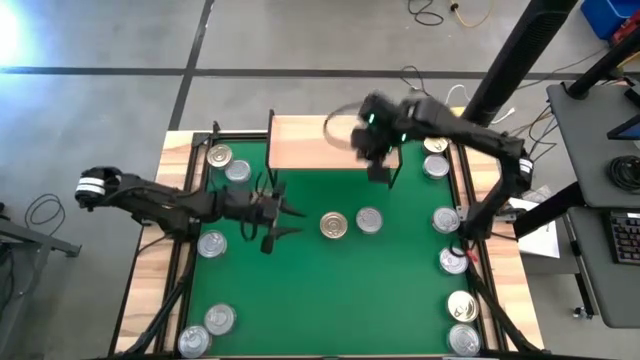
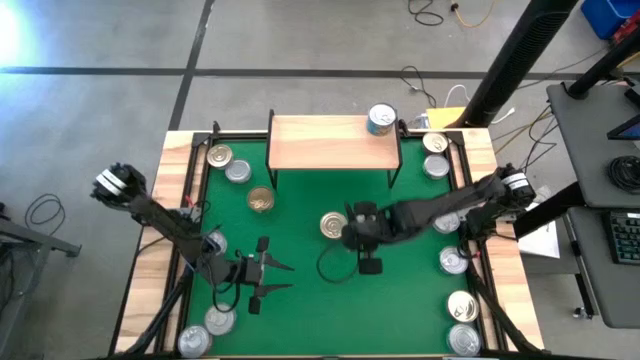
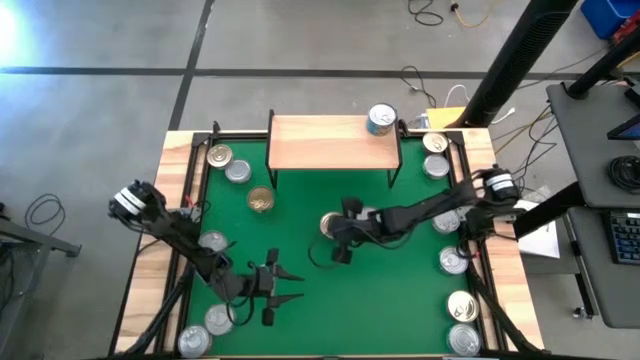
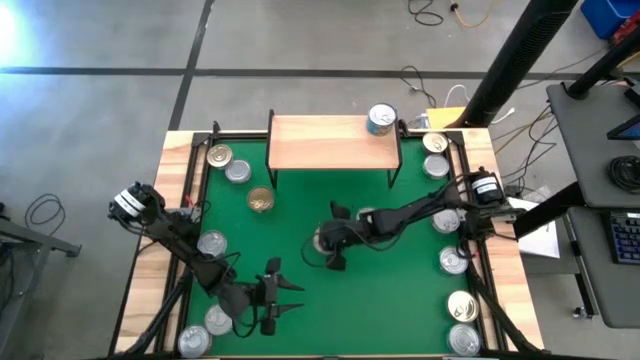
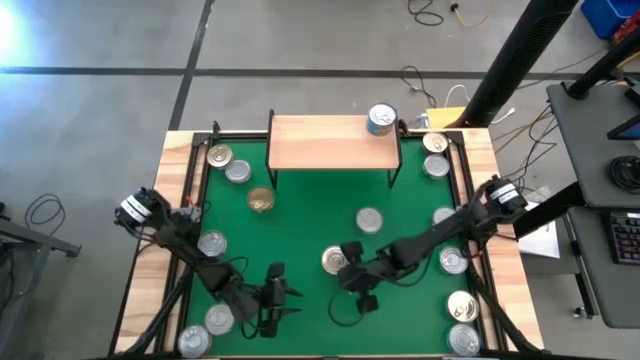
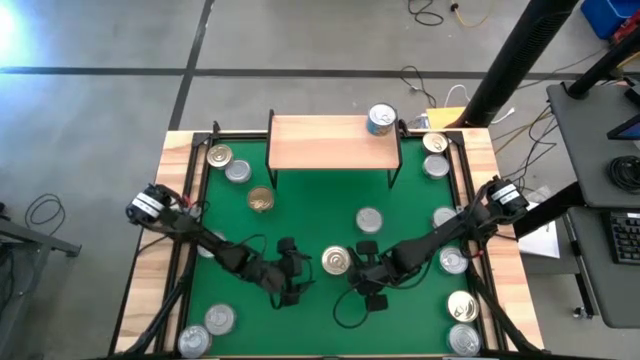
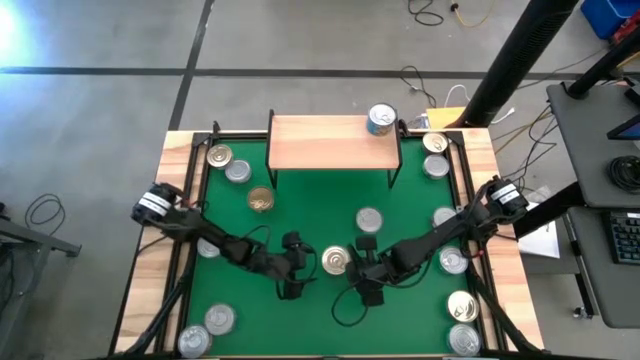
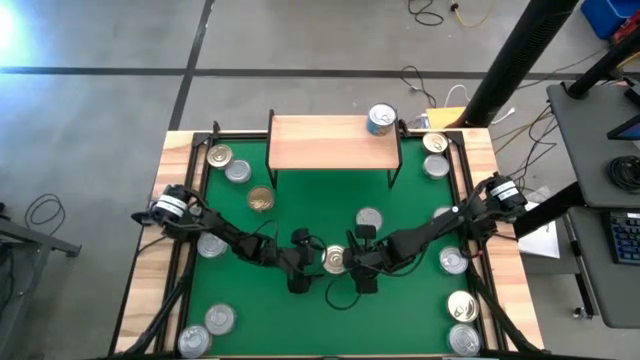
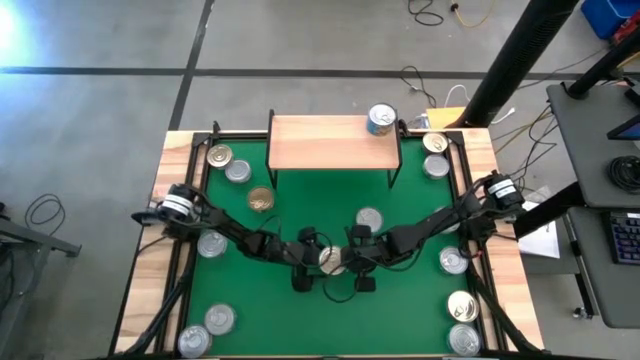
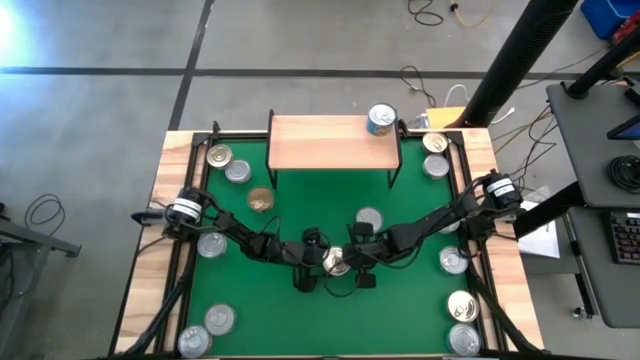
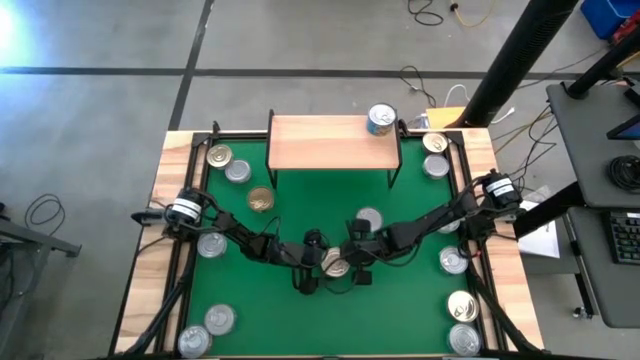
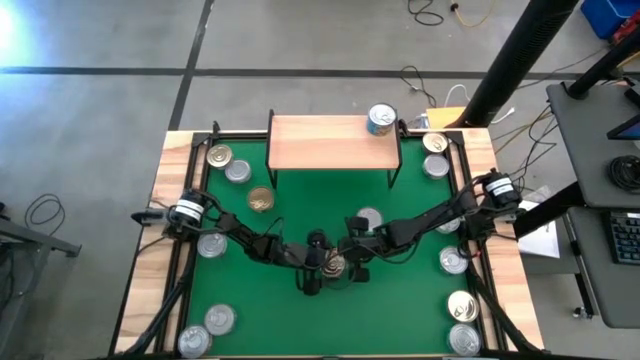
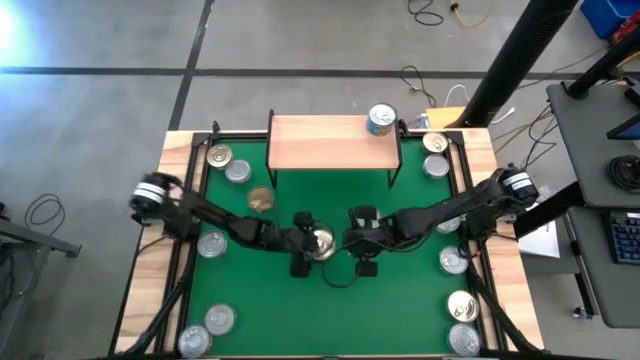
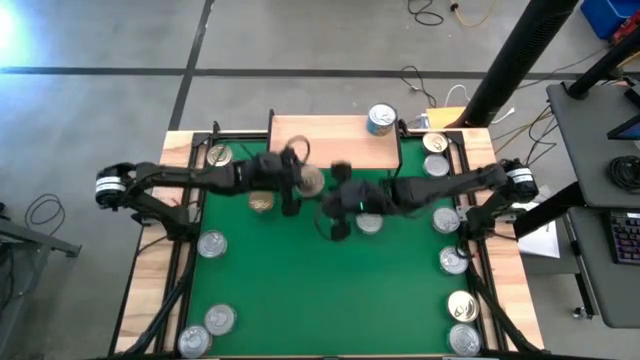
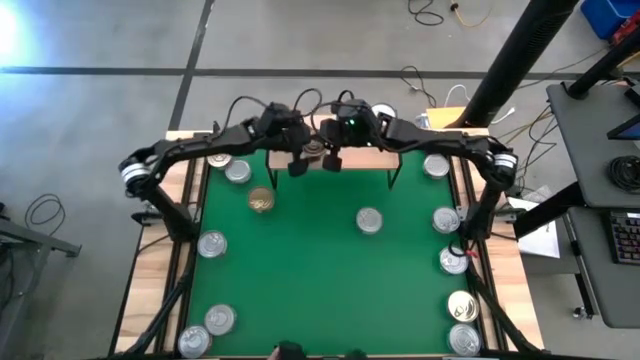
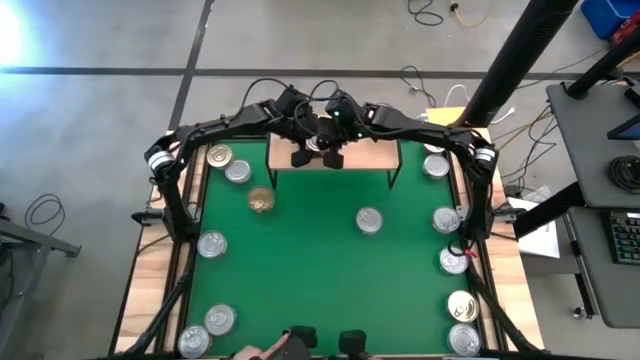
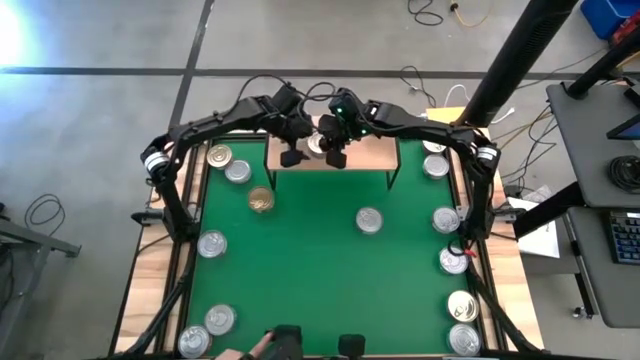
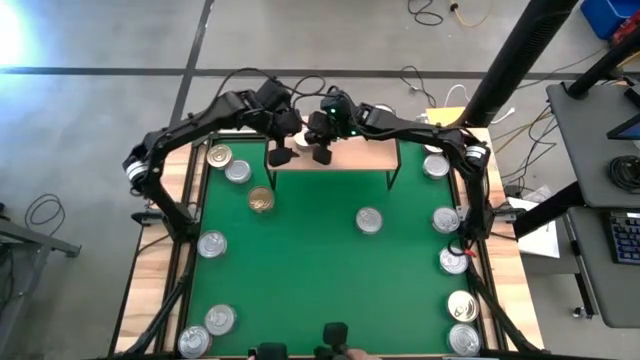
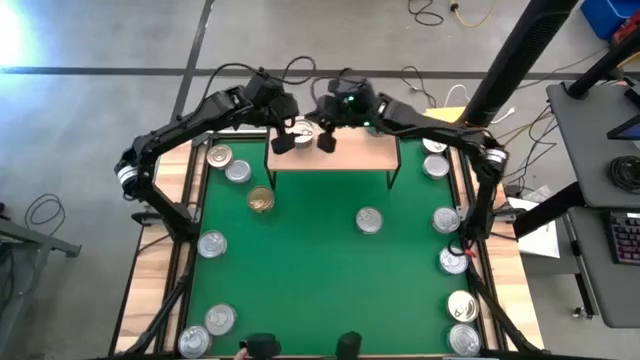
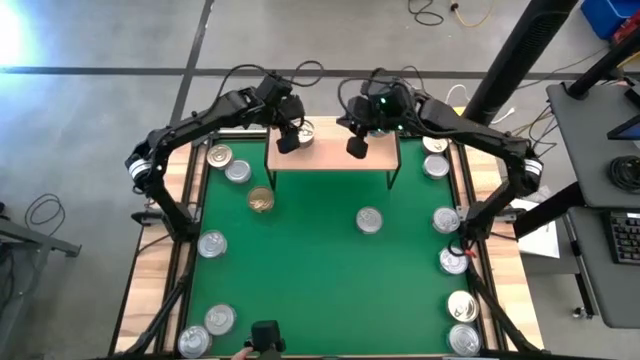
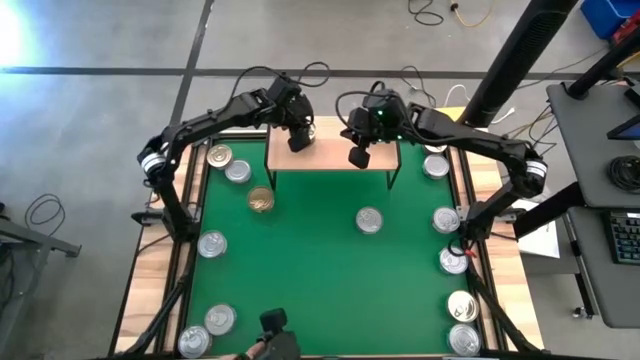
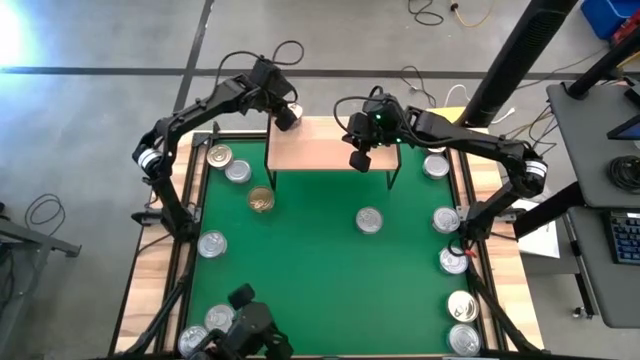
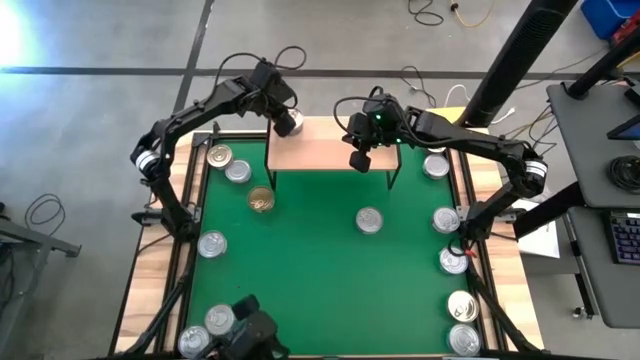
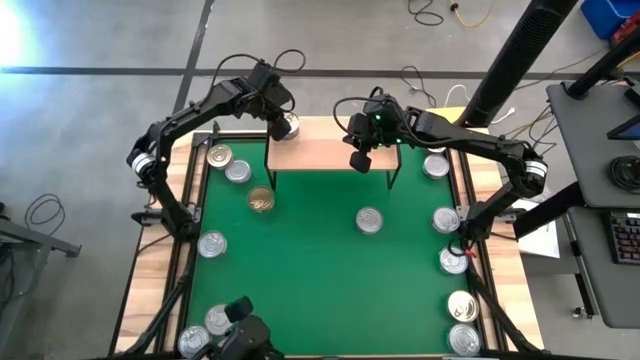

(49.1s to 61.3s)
Task: Stack canned seafood by type on shelf
Put the blue pink tuna can on the shelf

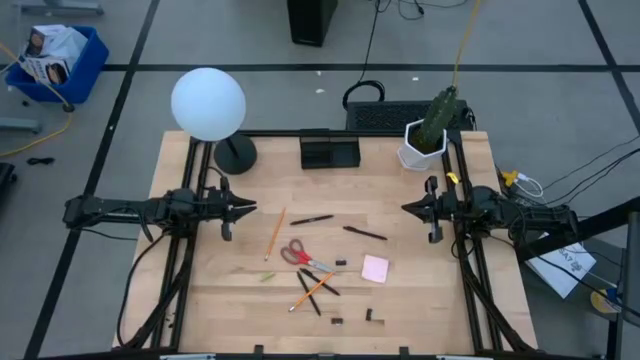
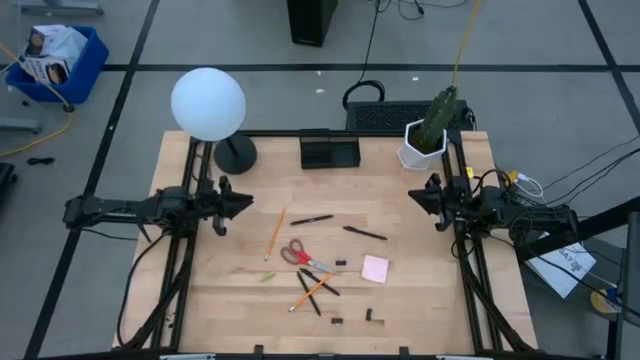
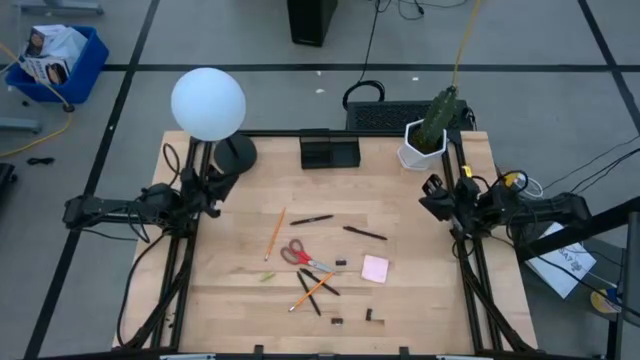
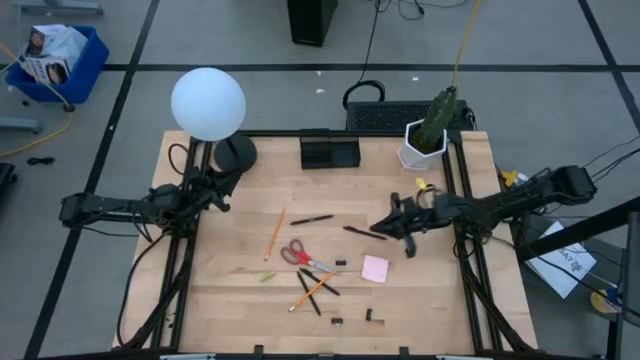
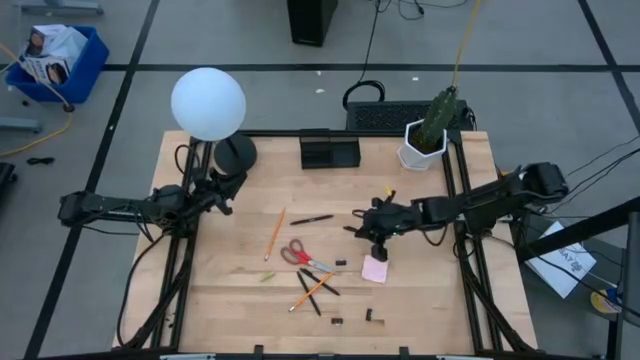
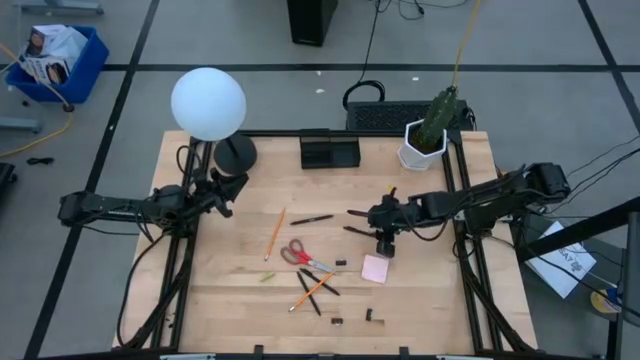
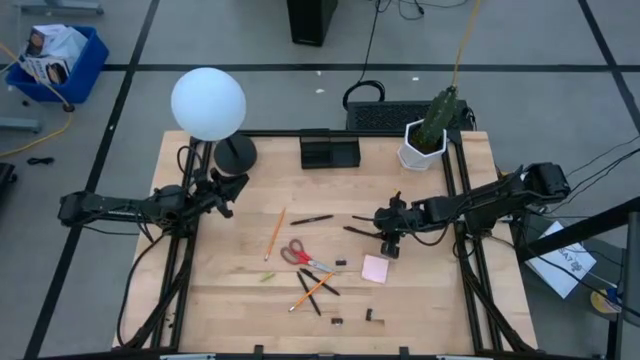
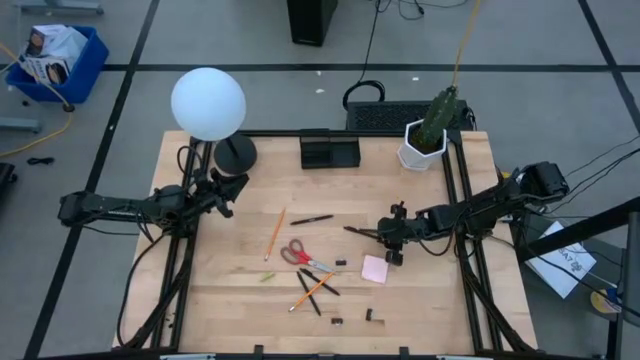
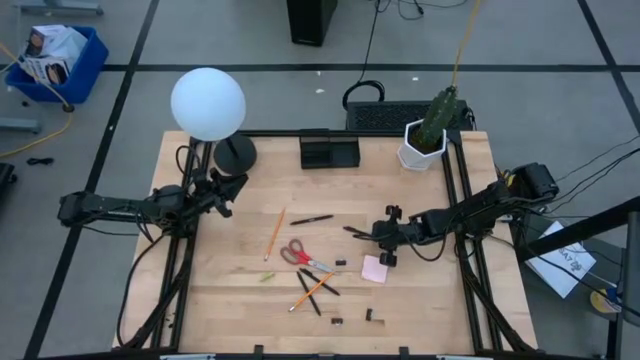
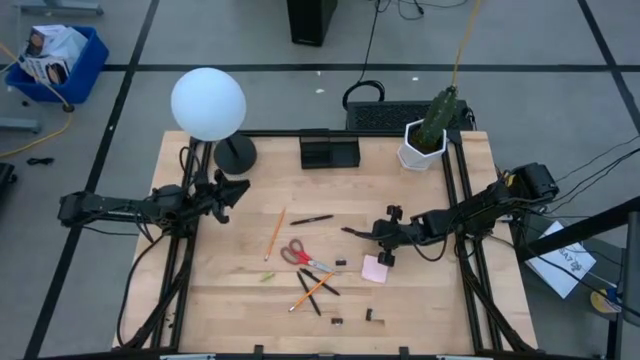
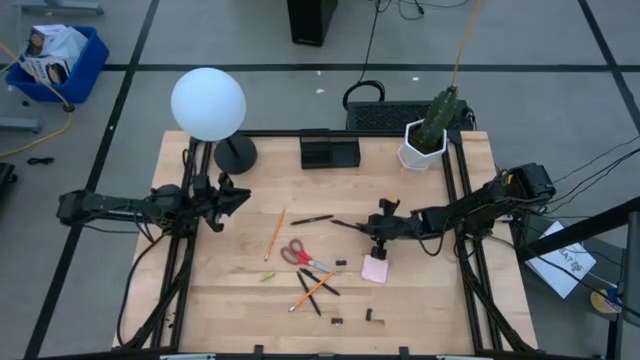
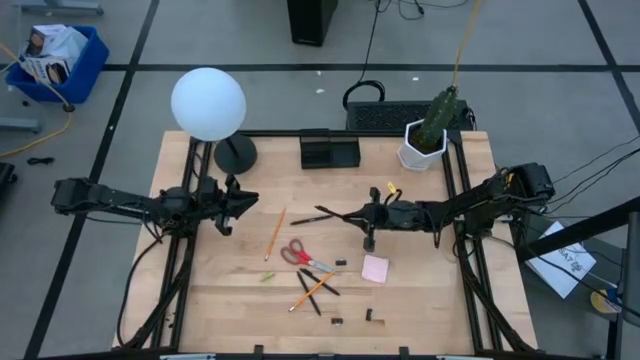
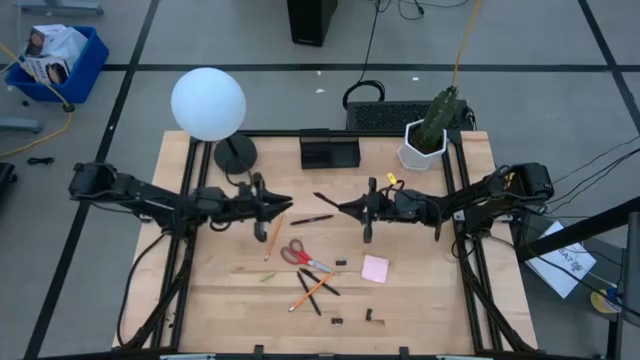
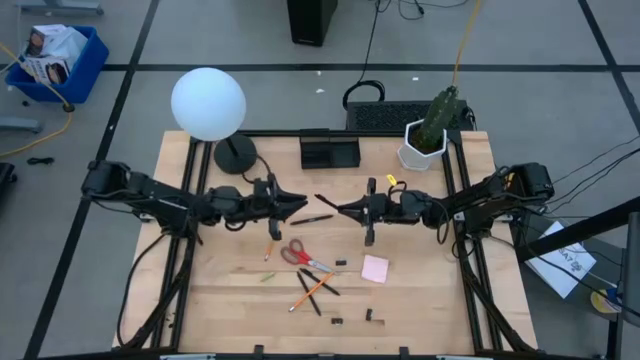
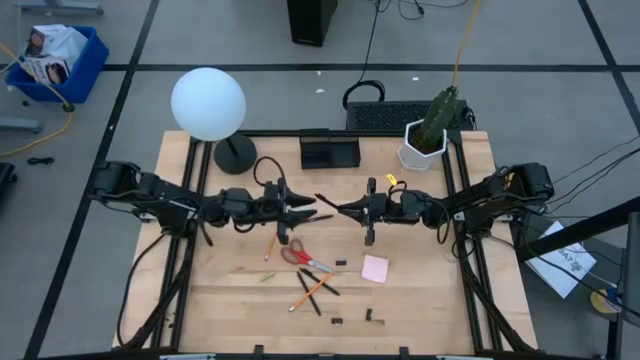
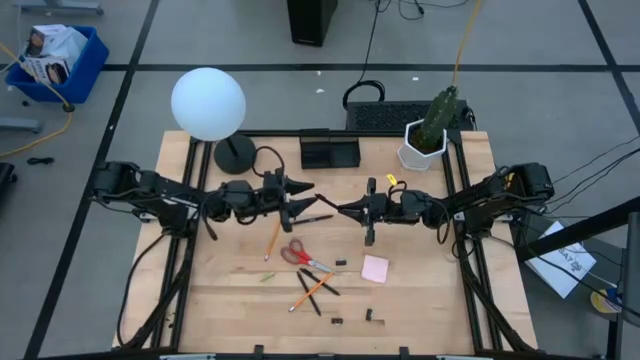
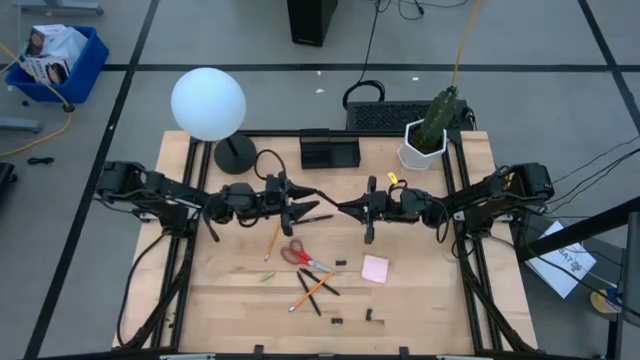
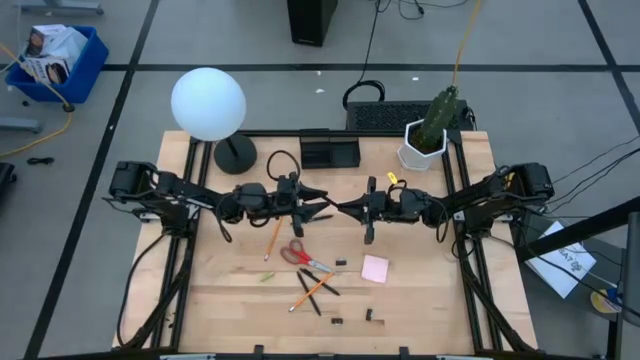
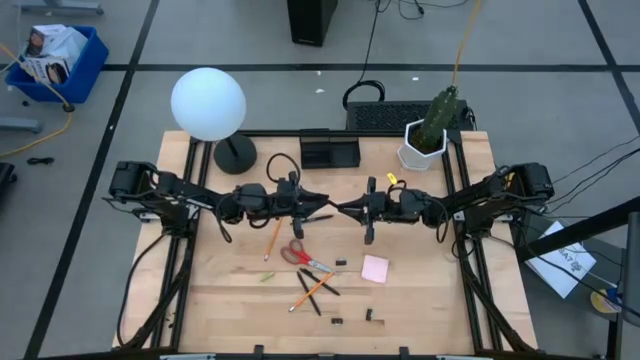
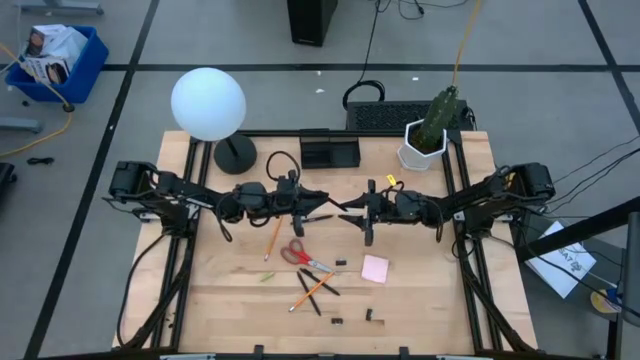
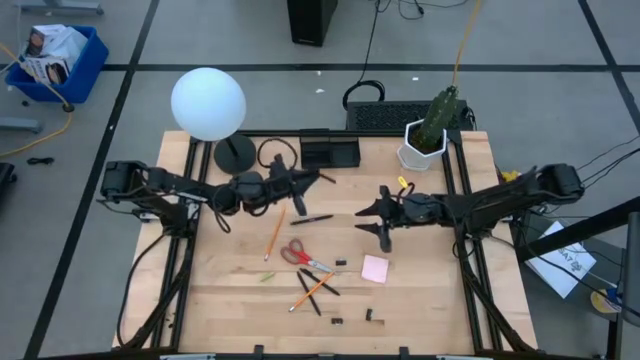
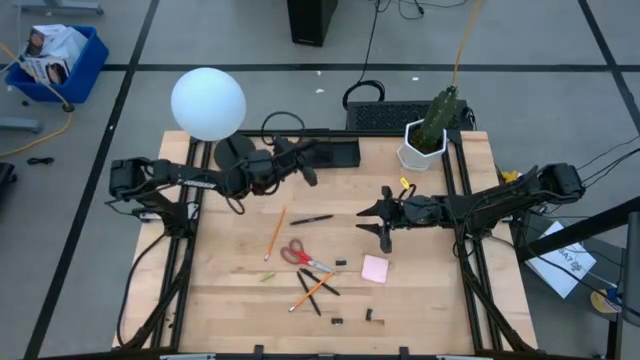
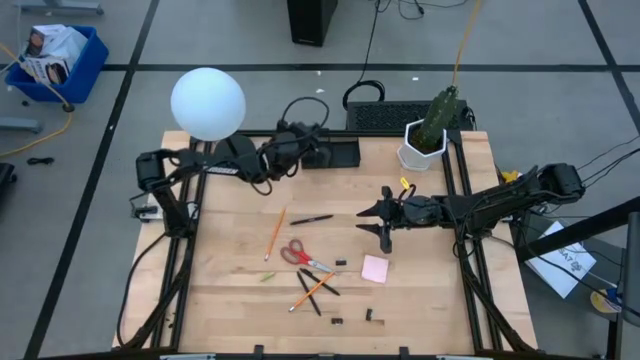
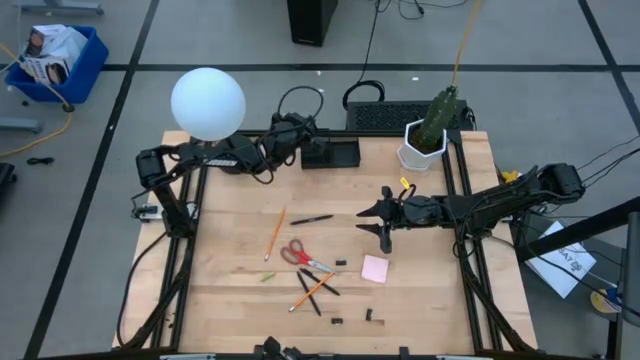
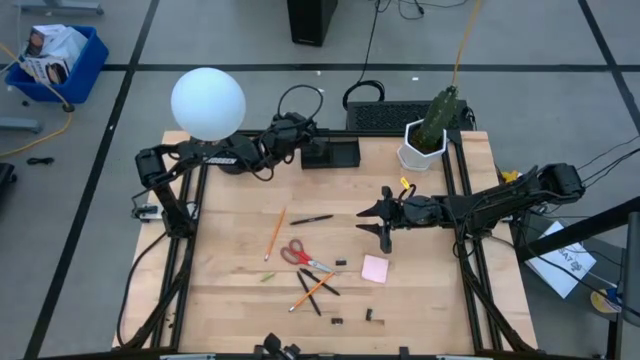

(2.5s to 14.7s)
Task: Pick and place office supplies into organizer
Put the black pen into the desk organizer
